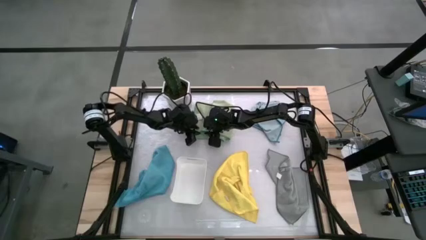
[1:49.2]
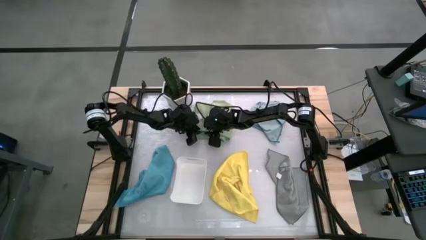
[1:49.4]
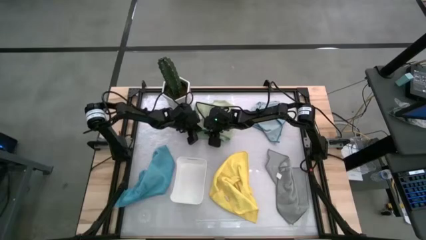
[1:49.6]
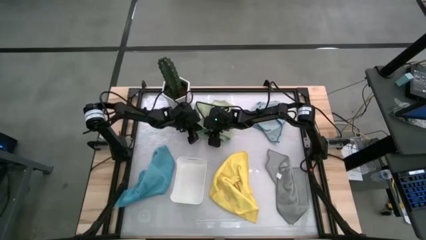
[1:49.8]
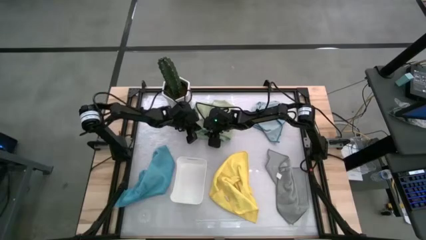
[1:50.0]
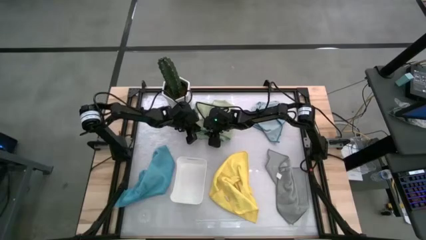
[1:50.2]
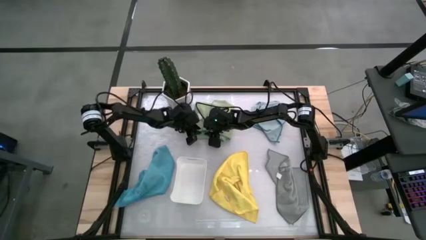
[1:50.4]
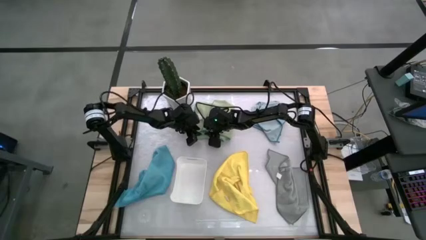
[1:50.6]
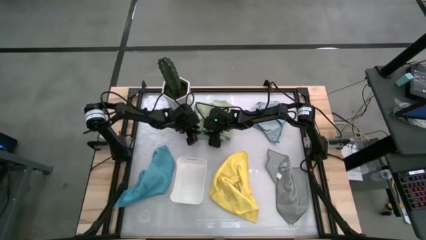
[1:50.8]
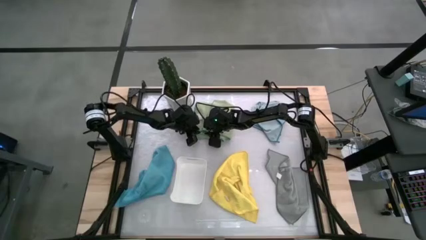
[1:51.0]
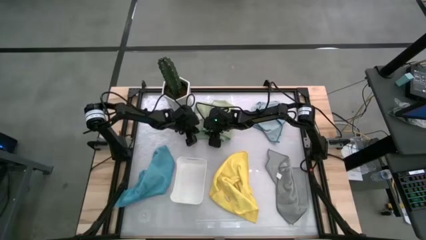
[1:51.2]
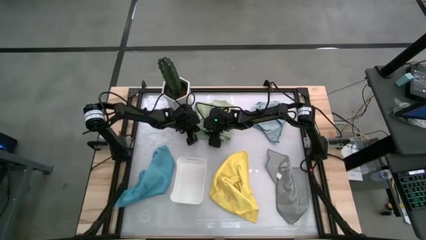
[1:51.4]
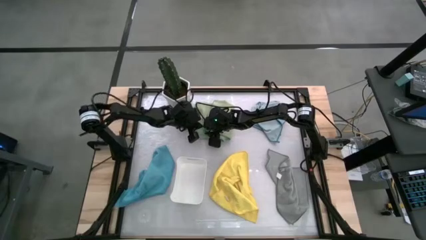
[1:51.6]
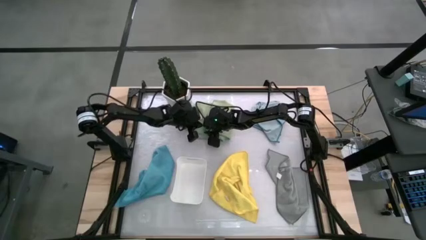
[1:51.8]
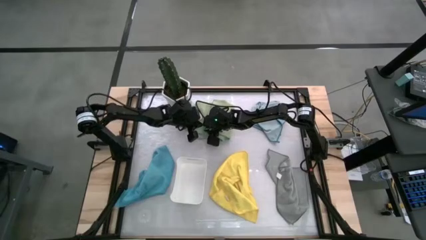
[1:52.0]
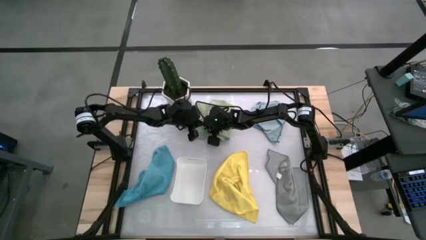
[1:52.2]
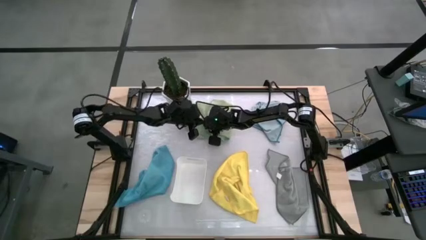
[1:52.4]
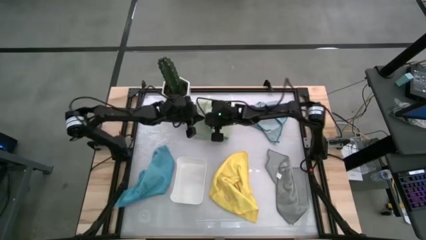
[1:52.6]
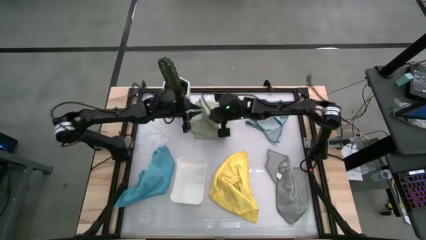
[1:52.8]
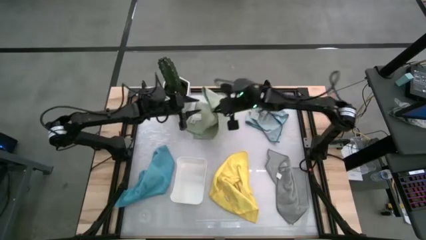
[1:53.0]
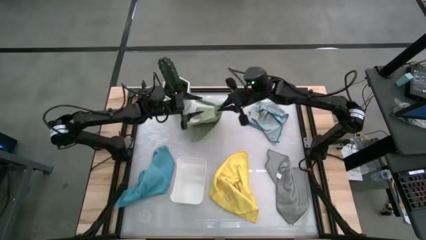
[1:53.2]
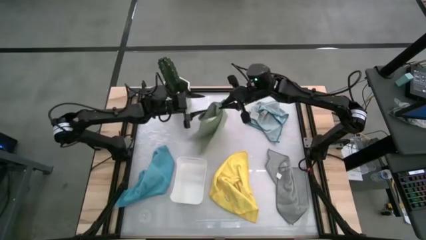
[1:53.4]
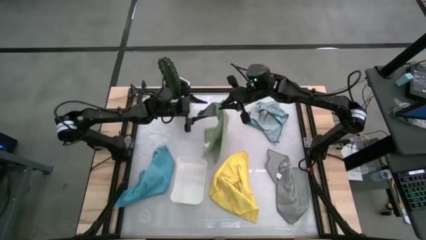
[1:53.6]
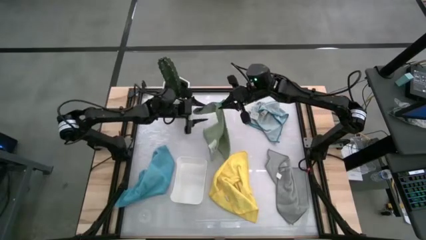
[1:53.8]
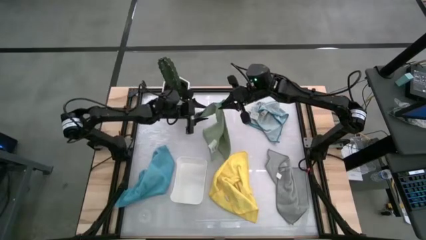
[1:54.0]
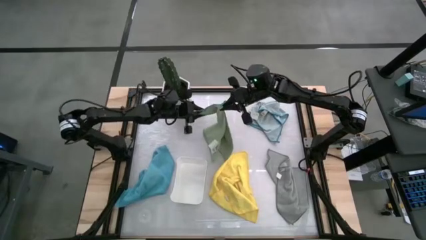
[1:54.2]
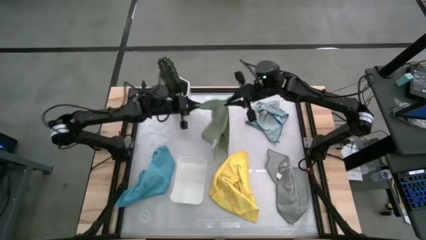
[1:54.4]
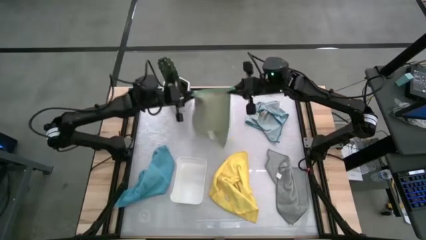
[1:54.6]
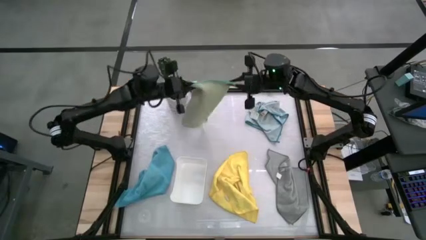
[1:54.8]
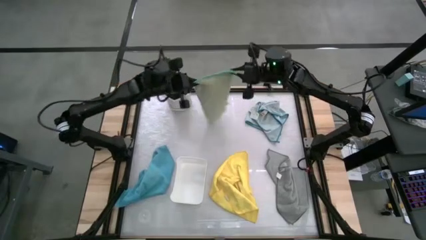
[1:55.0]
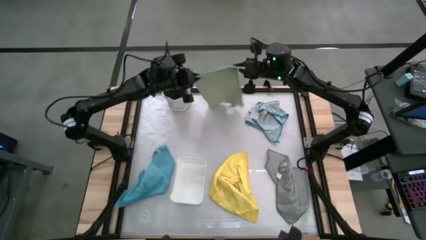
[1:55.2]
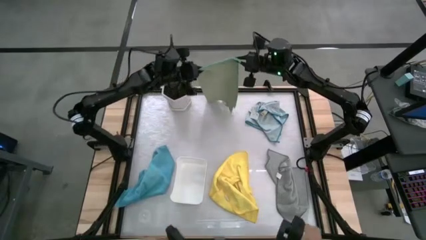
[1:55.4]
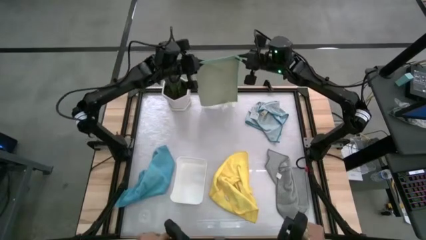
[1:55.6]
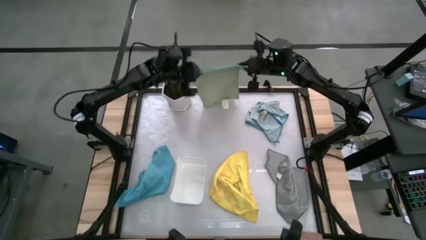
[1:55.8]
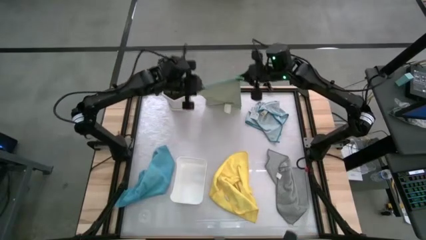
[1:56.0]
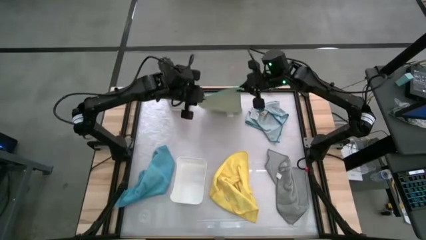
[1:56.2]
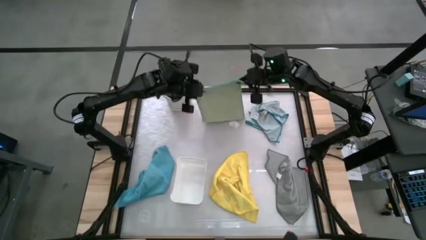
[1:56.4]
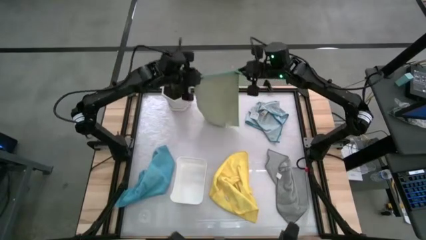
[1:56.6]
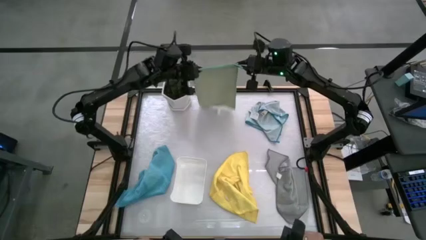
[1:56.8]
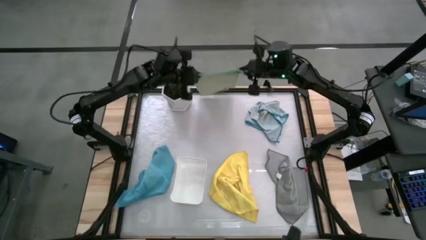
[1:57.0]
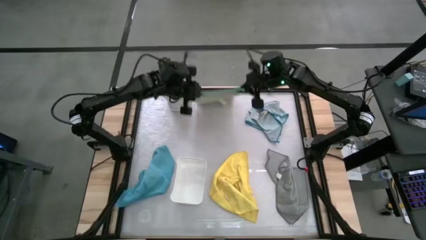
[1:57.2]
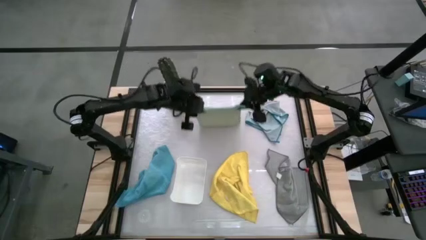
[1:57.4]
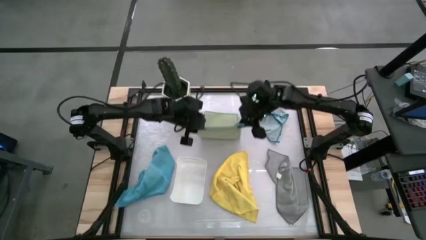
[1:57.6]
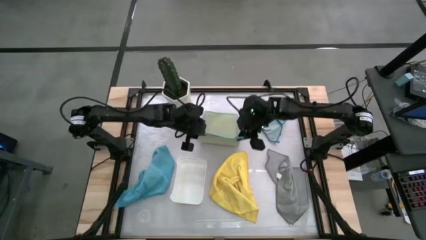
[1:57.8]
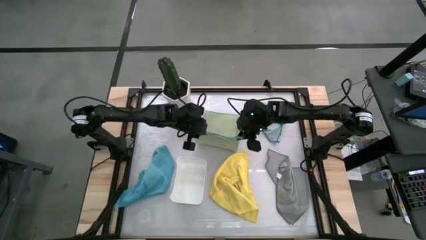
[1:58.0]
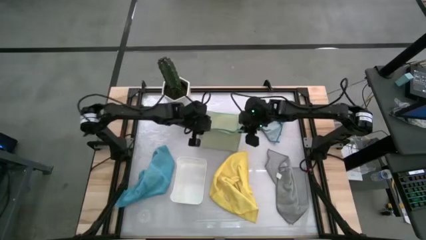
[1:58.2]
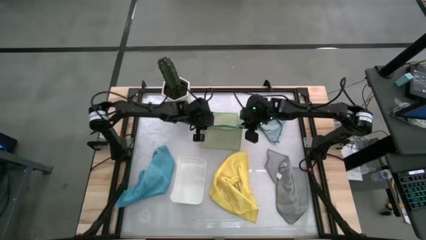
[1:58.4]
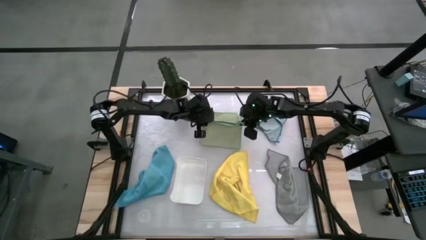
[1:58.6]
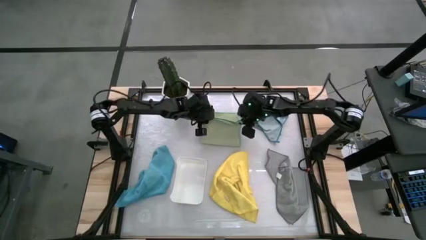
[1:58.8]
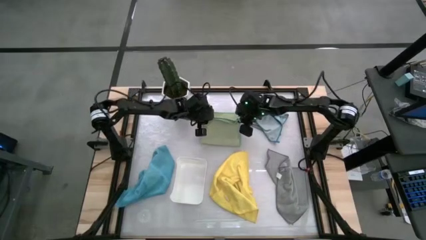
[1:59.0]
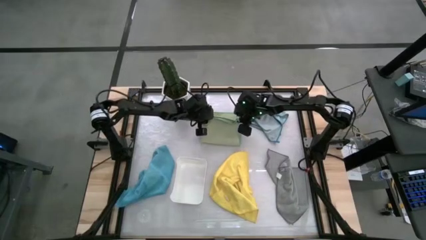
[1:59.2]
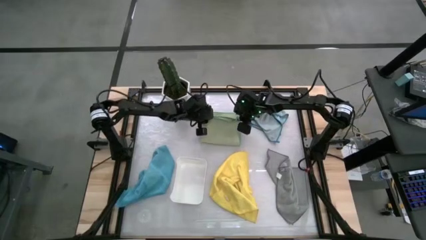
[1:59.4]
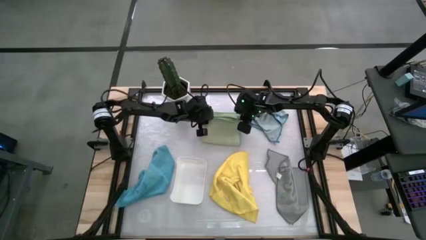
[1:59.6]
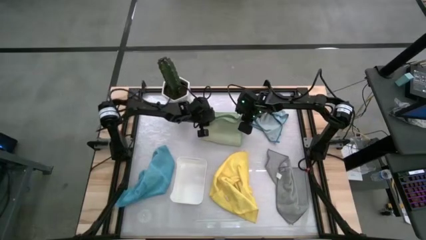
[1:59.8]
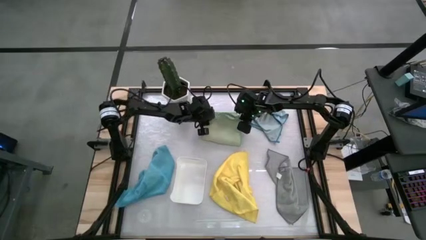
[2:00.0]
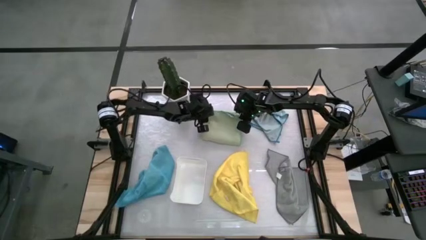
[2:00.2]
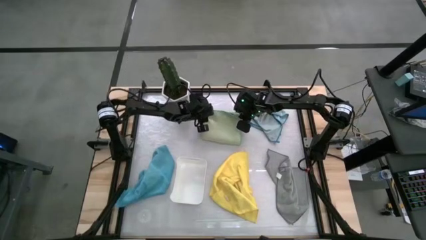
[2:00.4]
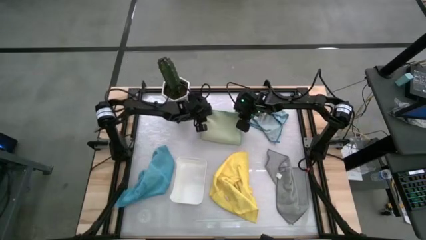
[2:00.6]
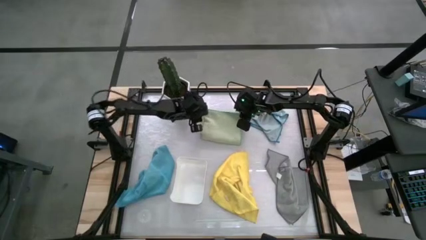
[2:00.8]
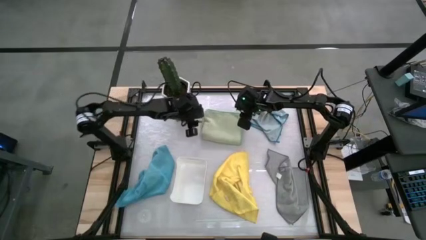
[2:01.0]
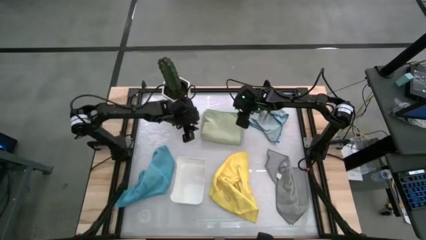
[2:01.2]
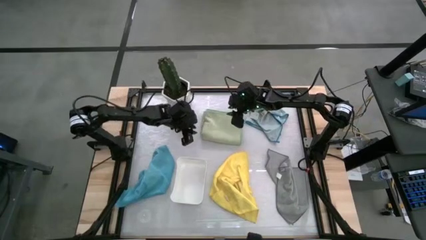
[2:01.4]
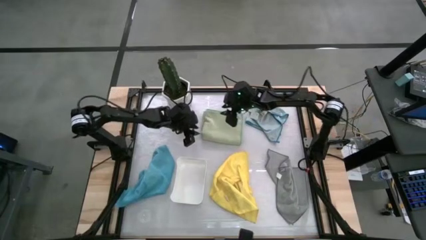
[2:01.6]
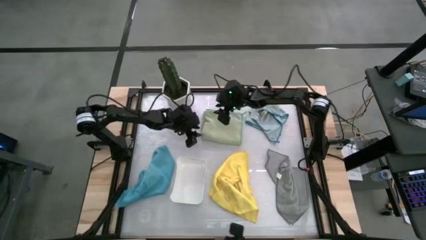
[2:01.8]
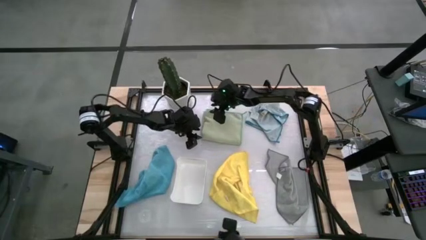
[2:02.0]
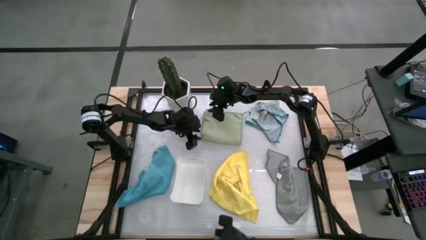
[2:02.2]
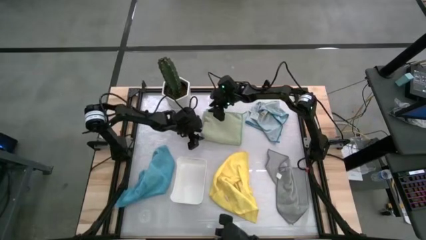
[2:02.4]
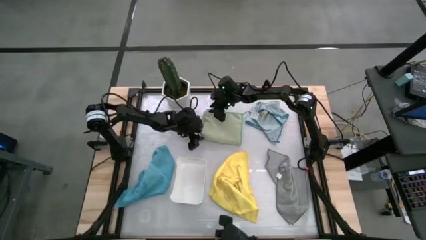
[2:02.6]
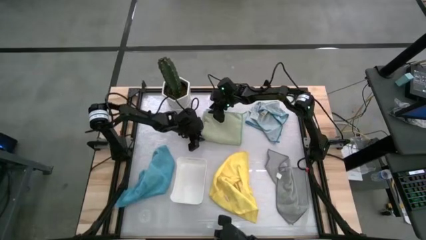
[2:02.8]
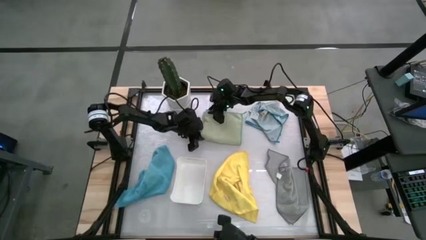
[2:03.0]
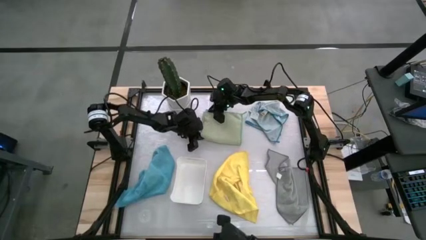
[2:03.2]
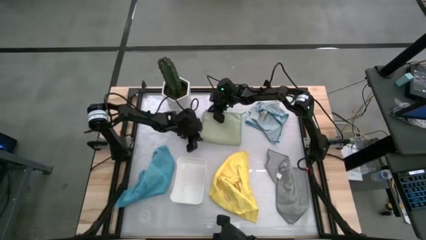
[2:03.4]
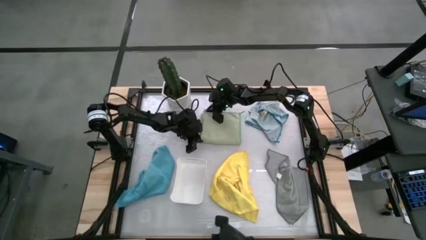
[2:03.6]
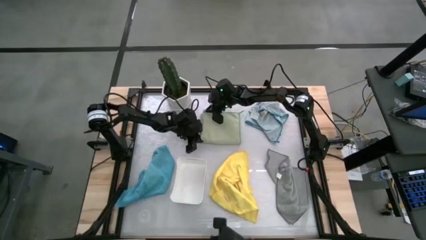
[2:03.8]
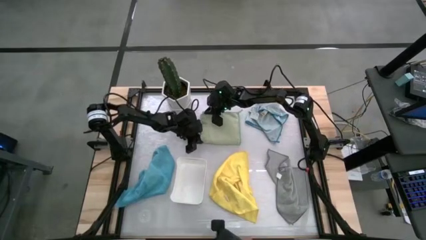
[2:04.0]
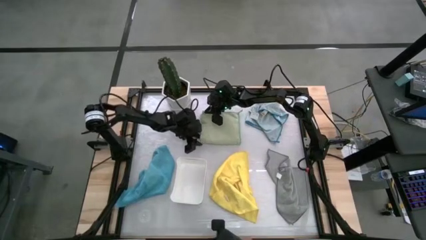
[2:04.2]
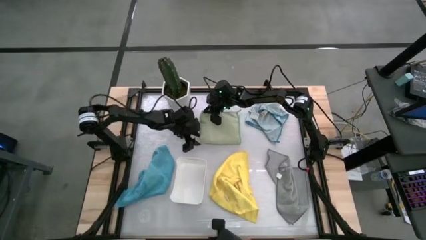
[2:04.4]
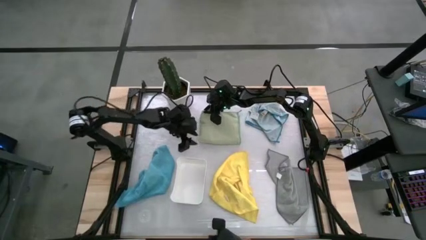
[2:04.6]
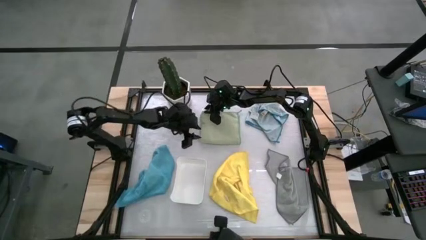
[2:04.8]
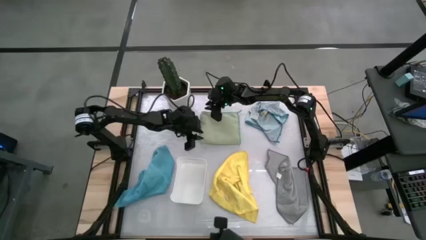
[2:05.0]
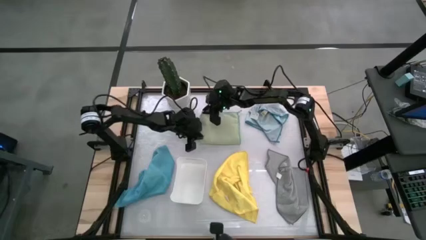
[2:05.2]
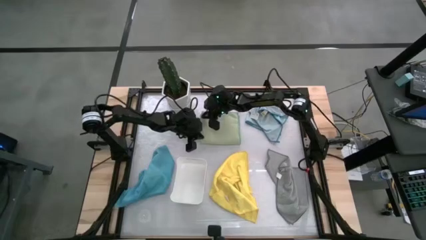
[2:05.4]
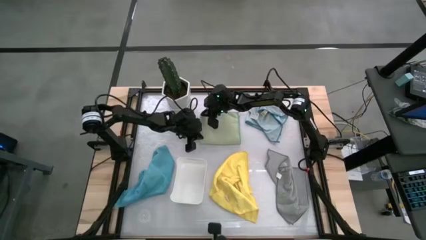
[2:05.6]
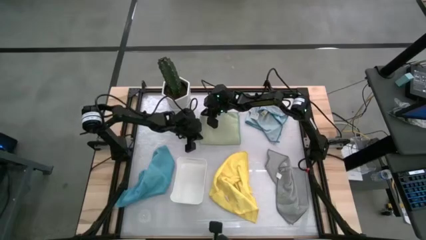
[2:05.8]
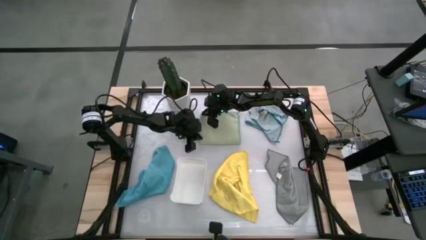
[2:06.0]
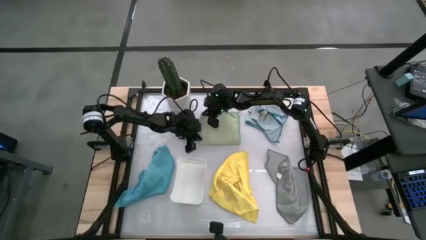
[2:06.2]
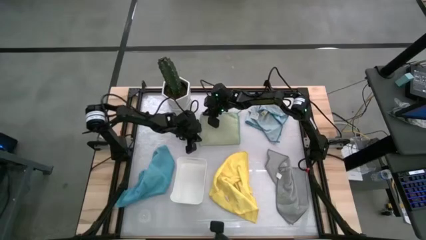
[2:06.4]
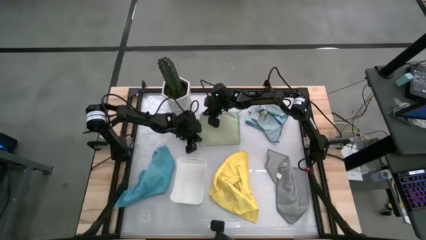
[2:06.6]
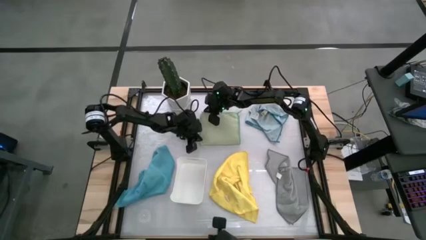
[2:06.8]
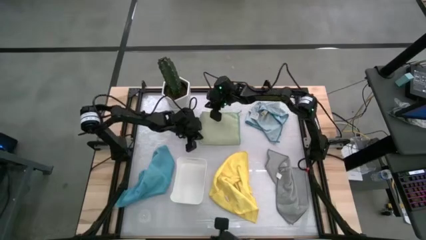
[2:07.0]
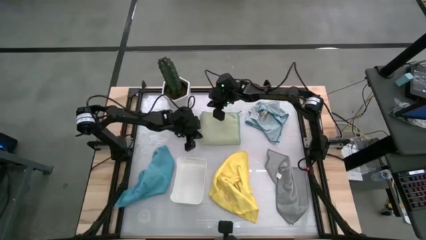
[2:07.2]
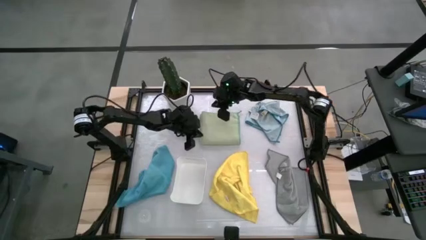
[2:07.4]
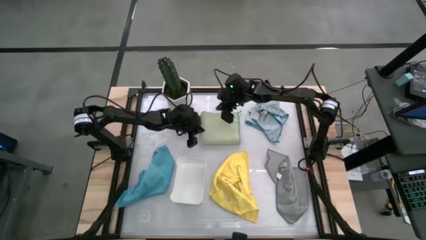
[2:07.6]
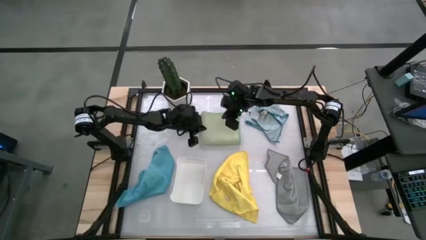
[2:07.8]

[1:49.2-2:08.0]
Task: Fold microfiber towels
Fold the green microfiber towel
